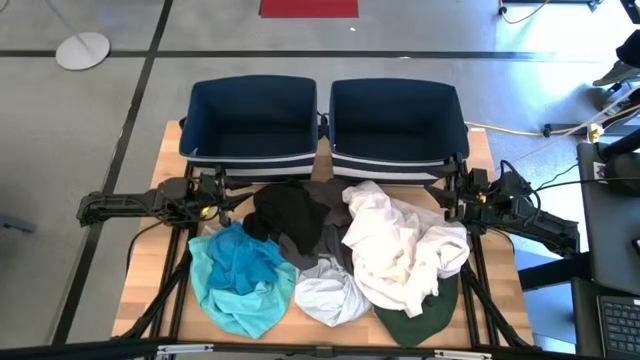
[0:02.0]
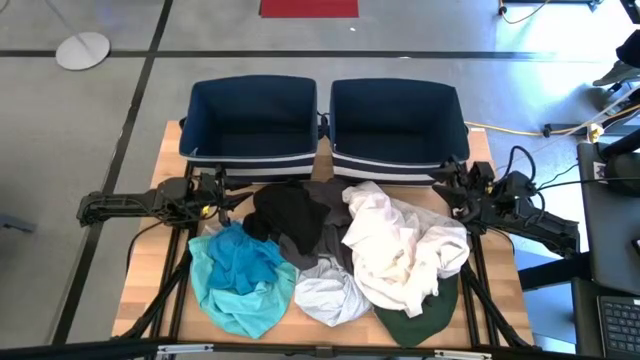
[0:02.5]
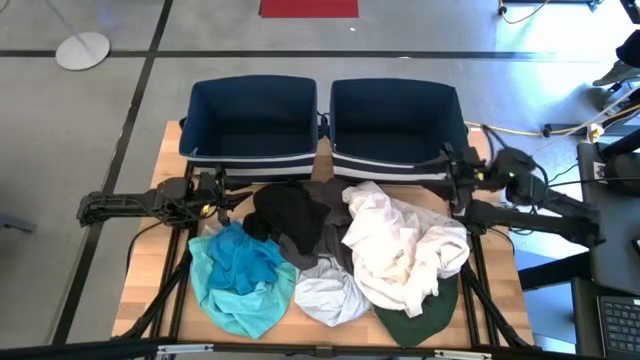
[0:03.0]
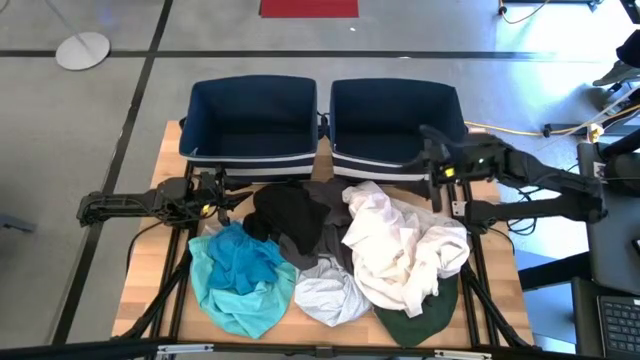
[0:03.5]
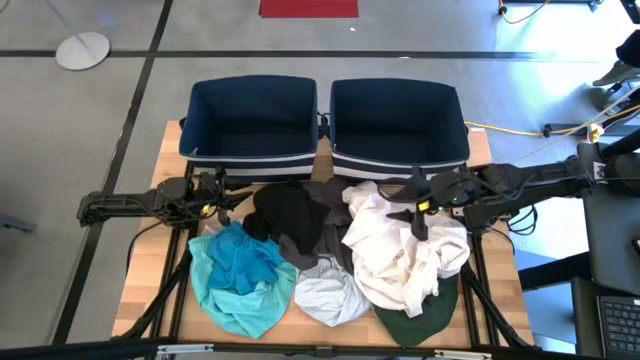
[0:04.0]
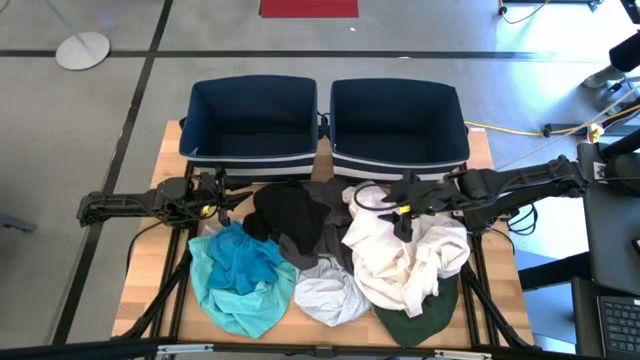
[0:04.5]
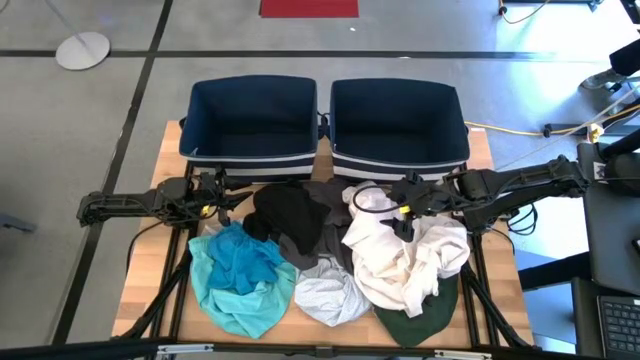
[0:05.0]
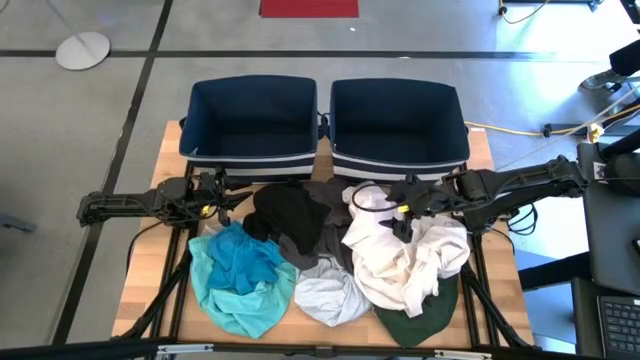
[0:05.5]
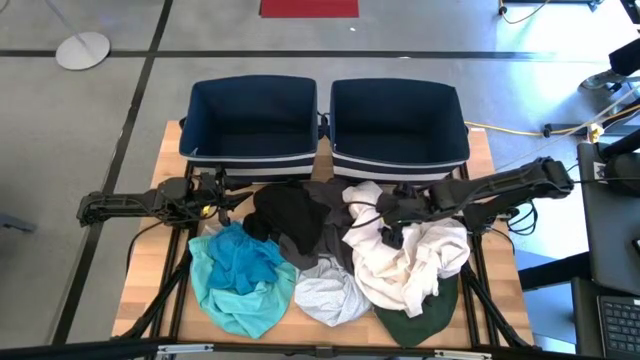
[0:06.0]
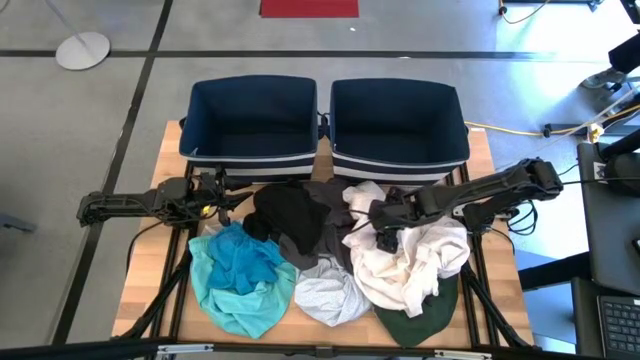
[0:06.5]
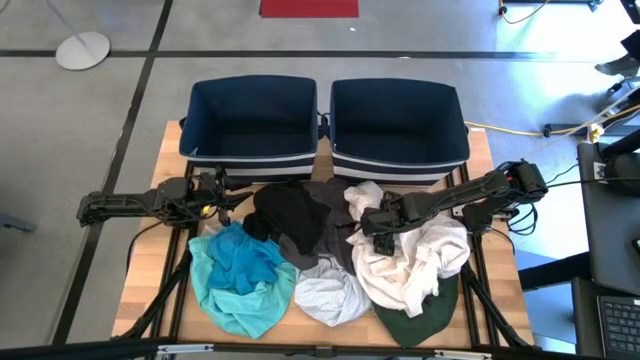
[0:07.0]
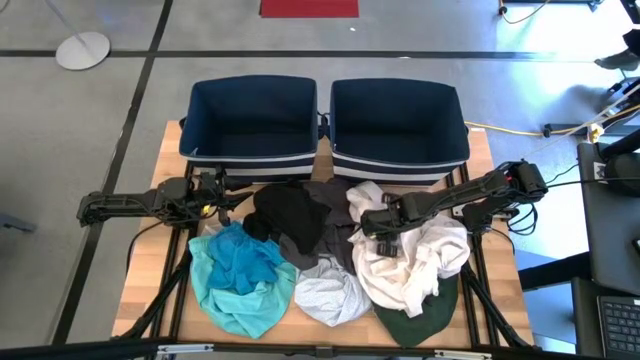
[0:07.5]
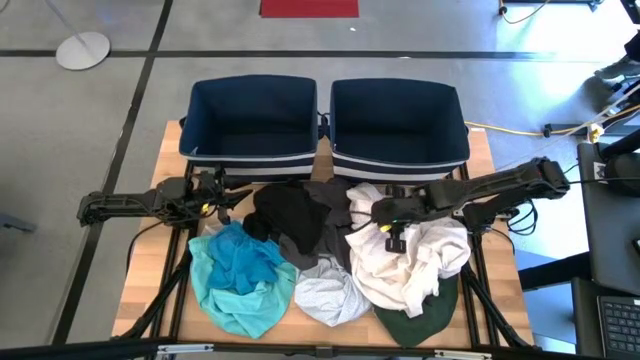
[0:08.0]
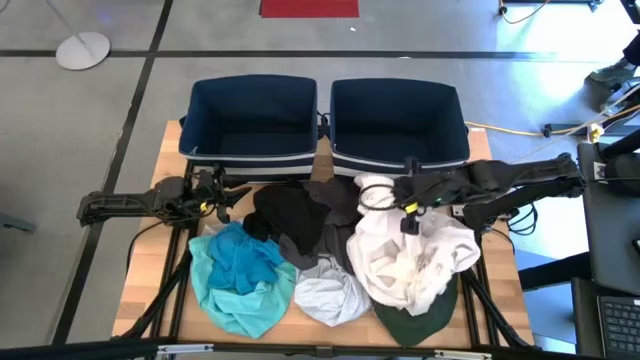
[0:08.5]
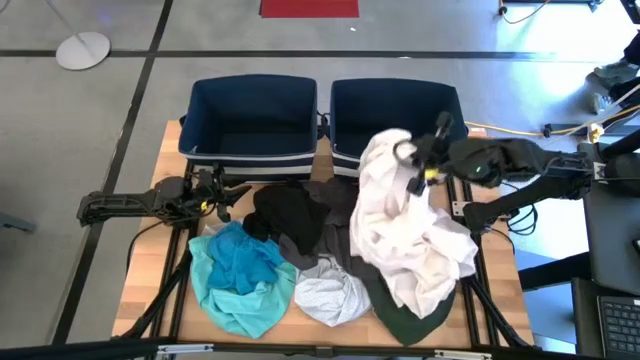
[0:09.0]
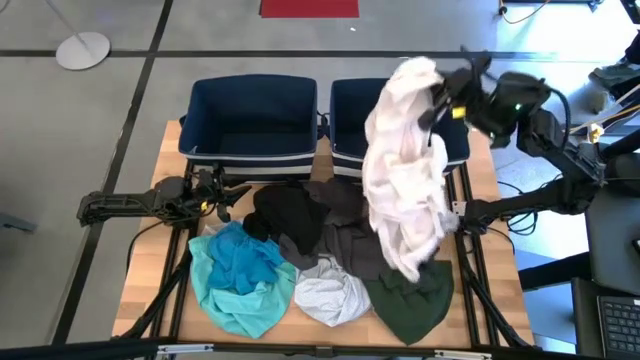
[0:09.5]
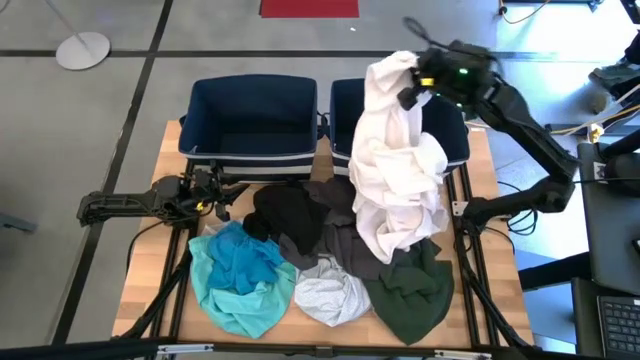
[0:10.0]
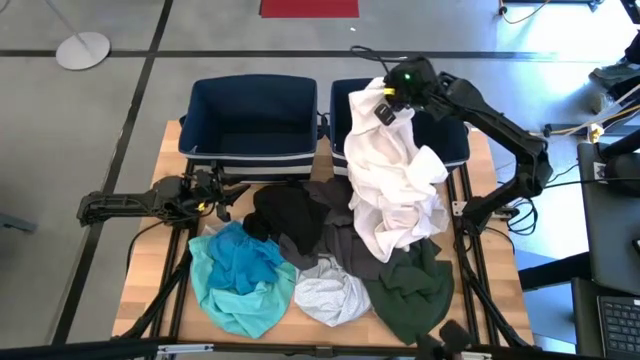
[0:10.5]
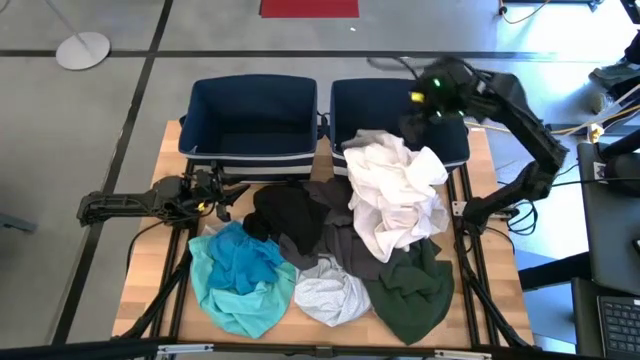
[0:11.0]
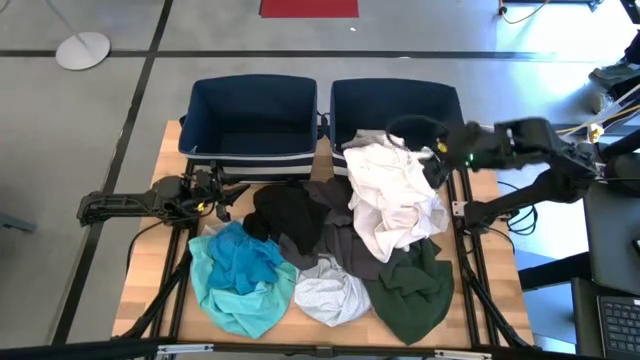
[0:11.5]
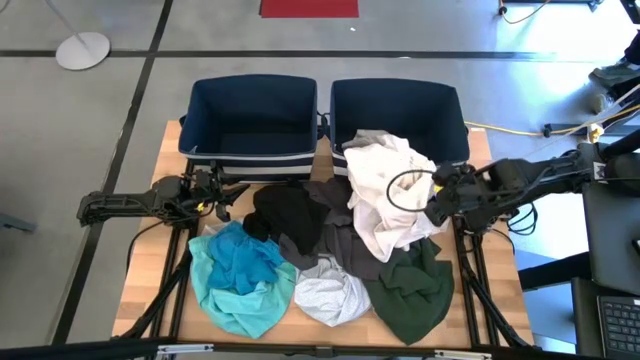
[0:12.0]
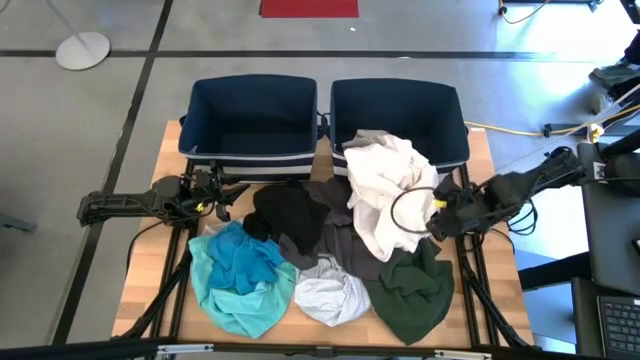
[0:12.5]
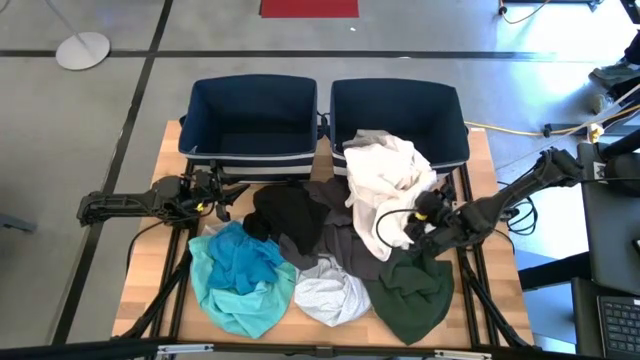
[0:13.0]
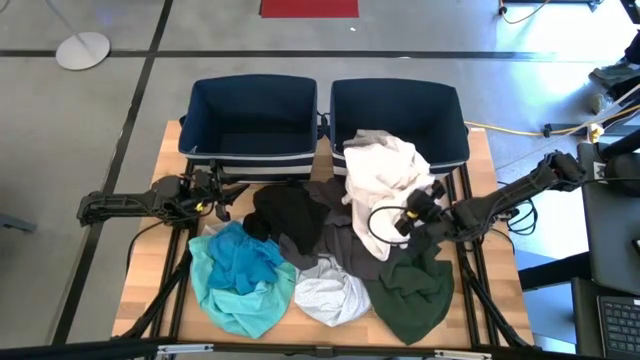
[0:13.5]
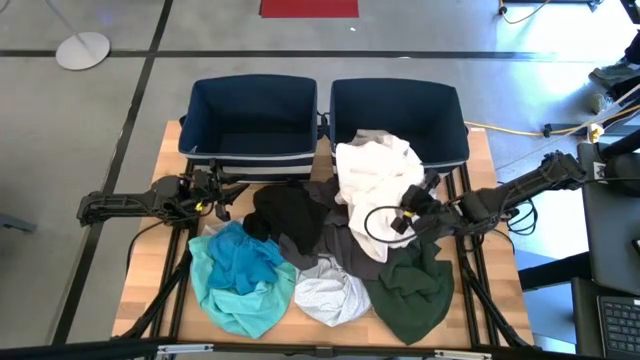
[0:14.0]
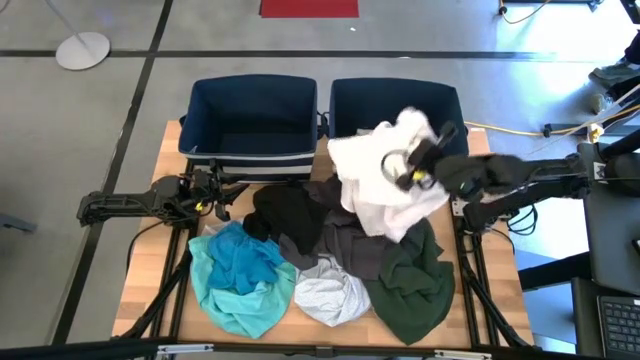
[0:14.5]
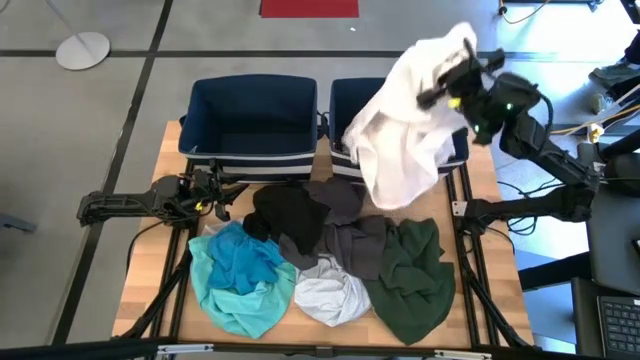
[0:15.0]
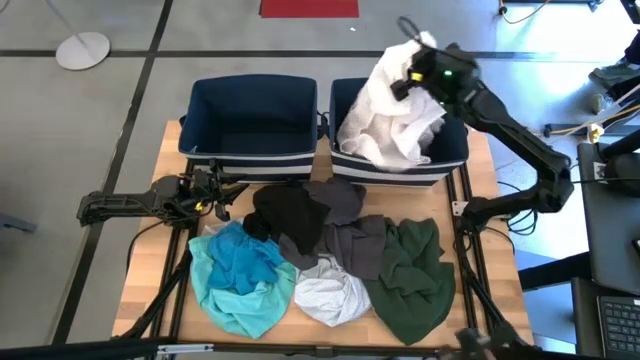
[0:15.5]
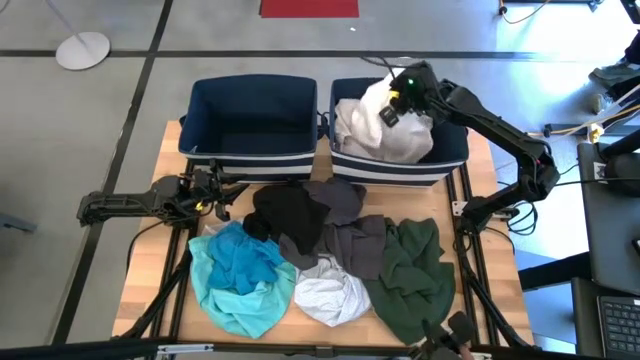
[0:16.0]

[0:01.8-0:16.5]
Task: Sort clothes
Put the white shirt into the right blue laundry bin

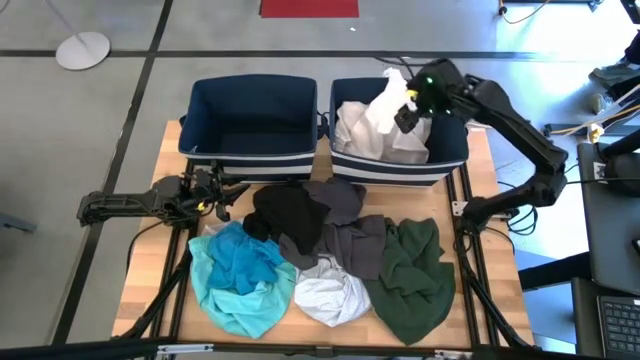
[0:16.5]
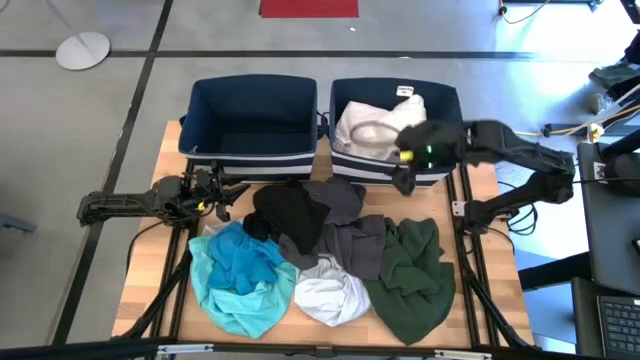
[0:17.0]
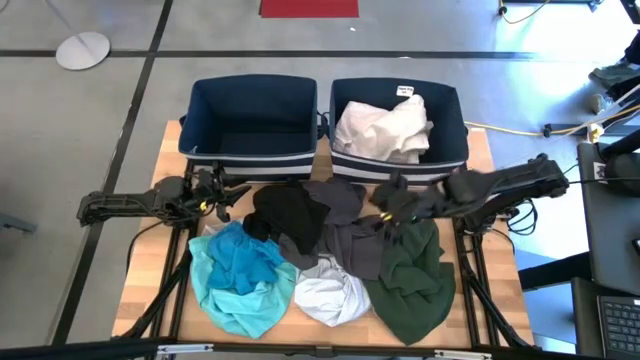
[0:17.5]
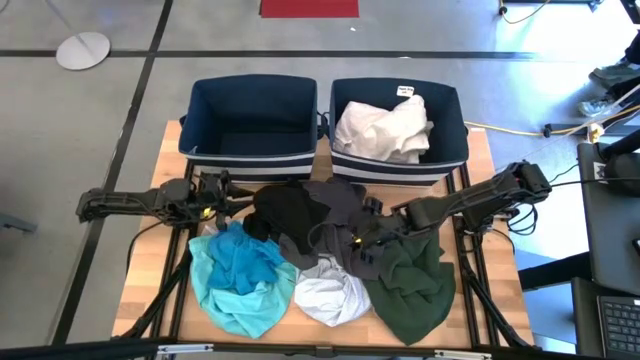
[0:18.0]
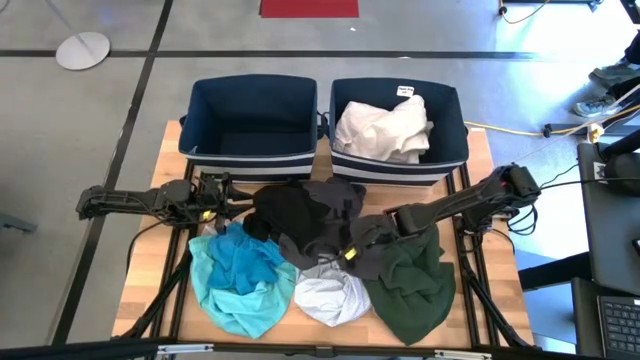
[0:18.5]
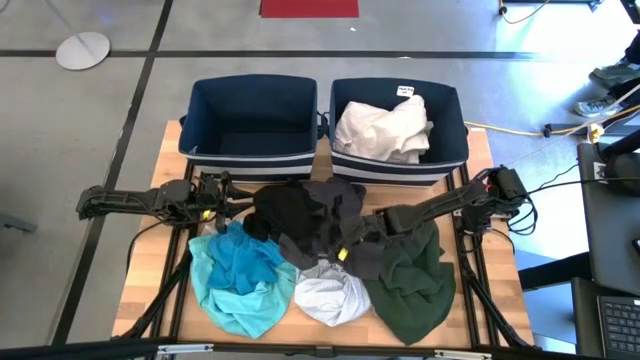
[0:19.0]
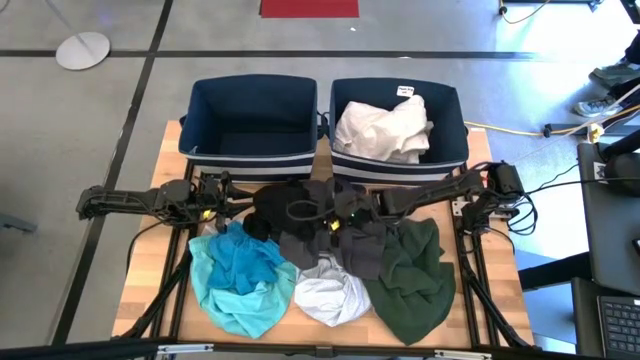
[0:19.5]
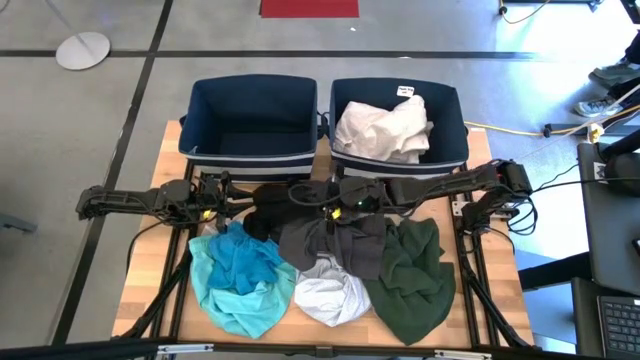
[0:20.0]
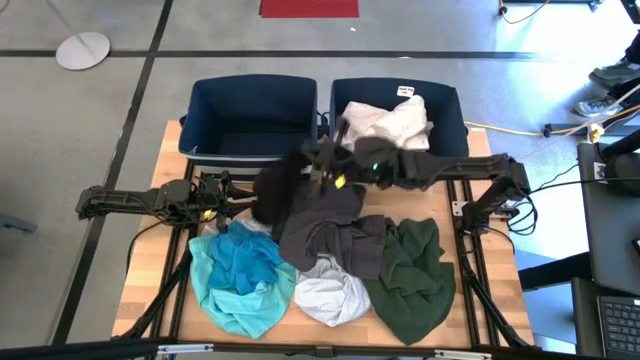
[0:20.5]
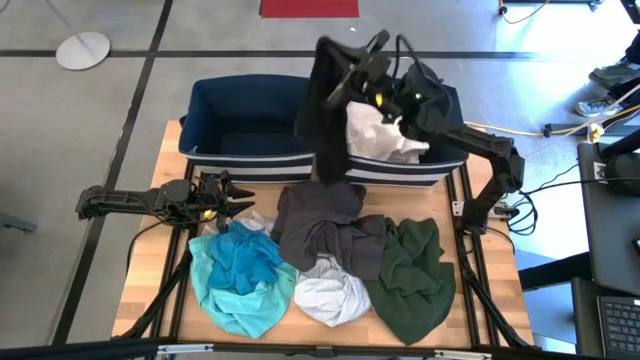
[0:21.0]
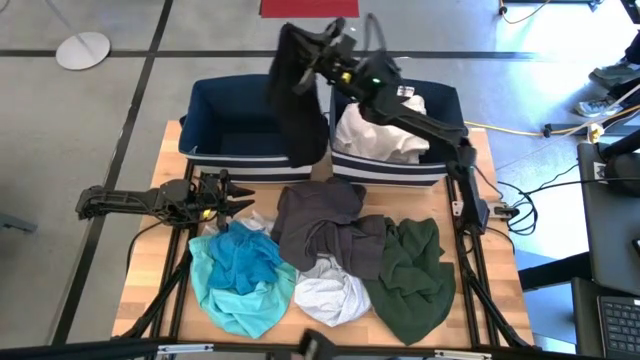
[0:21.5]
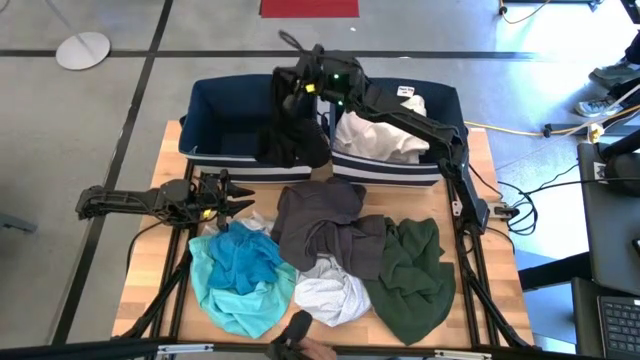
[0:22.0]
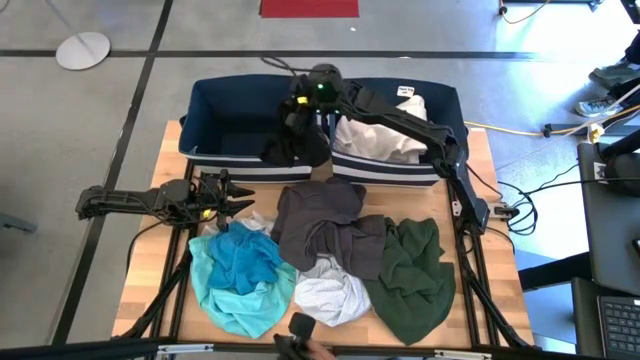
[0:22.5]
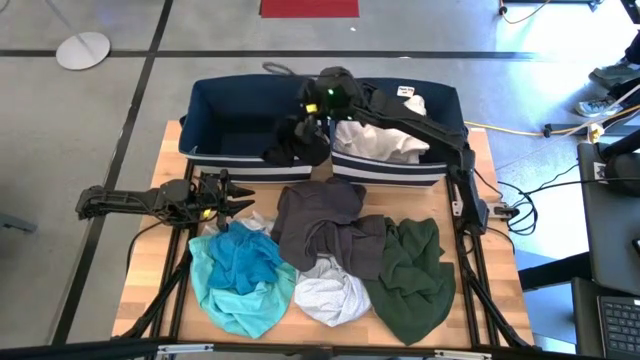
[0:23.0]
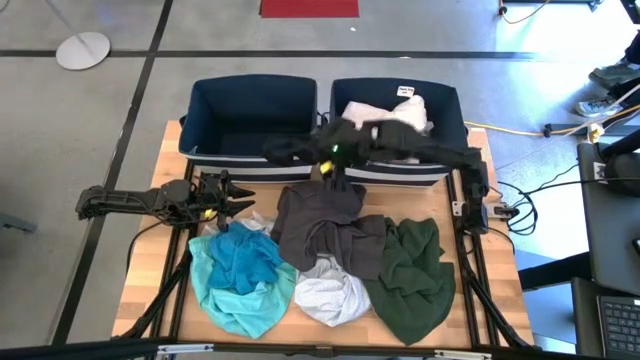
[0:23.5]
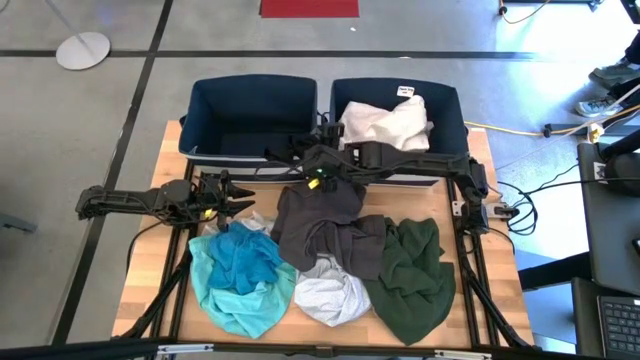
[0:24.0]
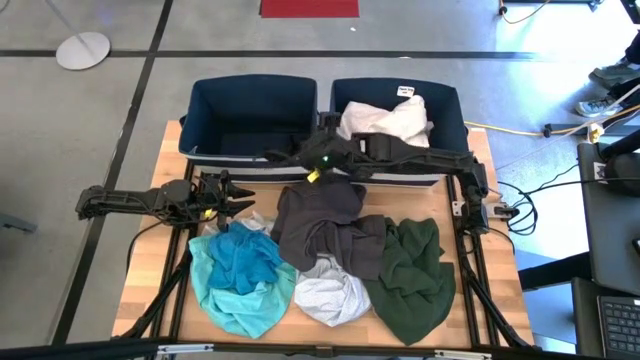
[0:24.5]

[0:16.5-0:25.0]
Put the black underwear into the left blue laundry bin
